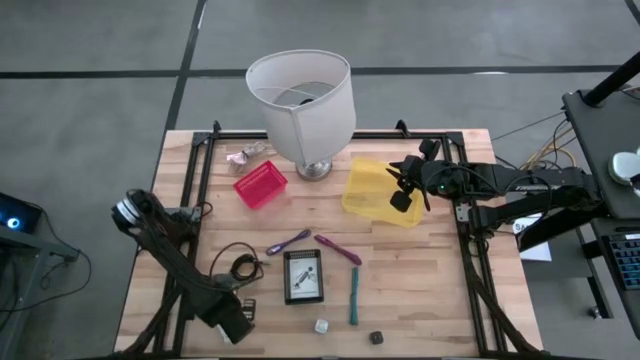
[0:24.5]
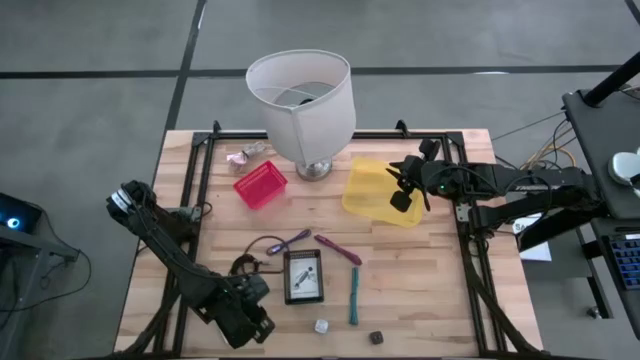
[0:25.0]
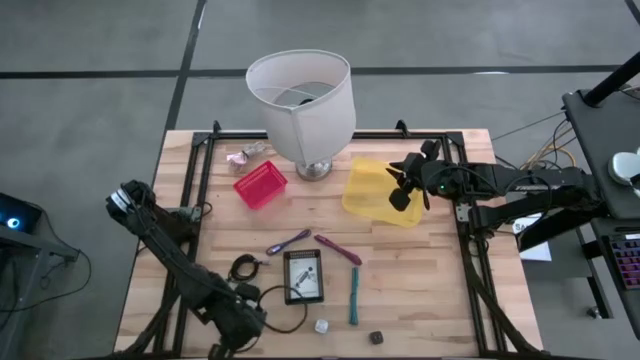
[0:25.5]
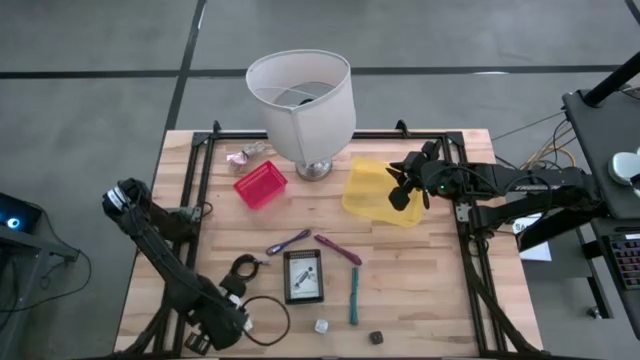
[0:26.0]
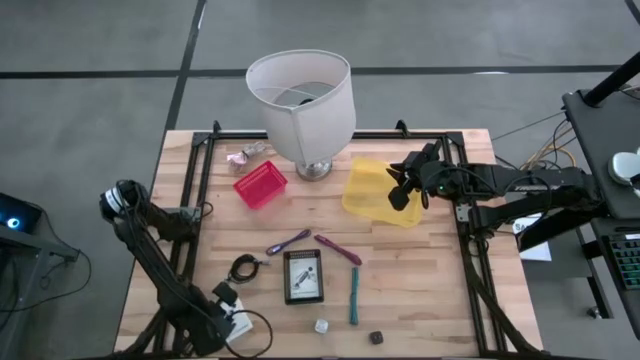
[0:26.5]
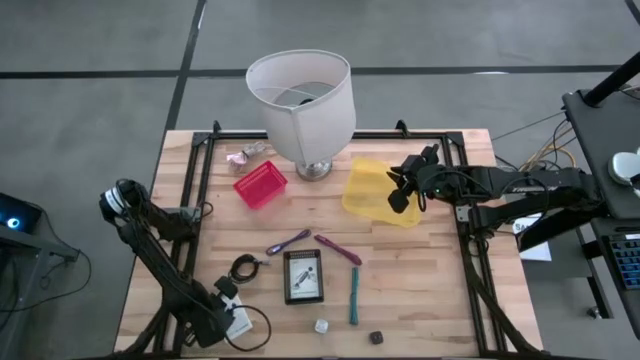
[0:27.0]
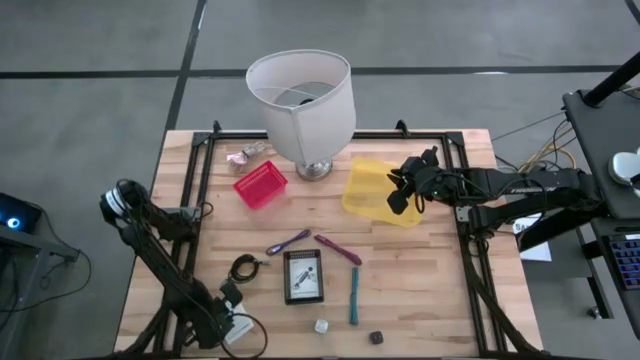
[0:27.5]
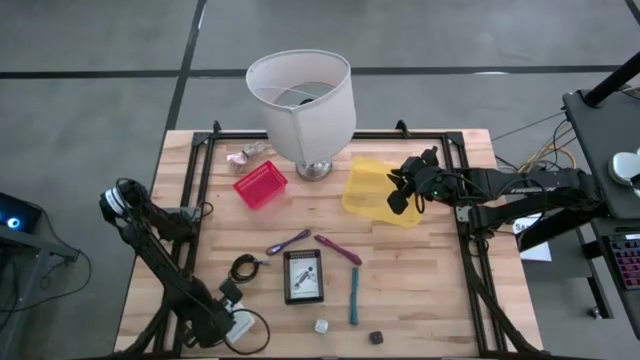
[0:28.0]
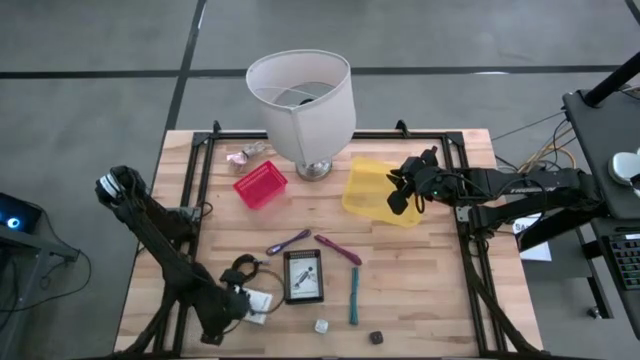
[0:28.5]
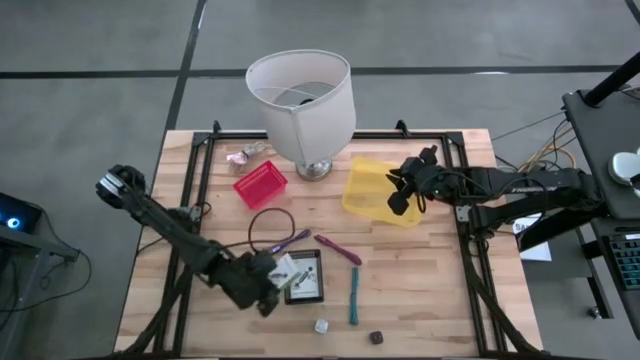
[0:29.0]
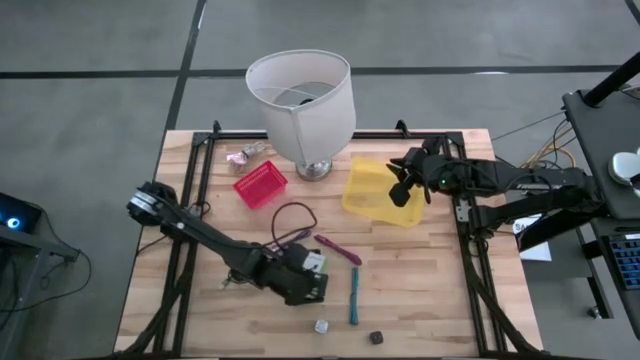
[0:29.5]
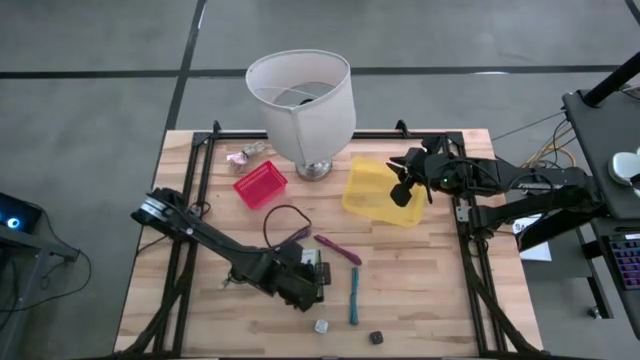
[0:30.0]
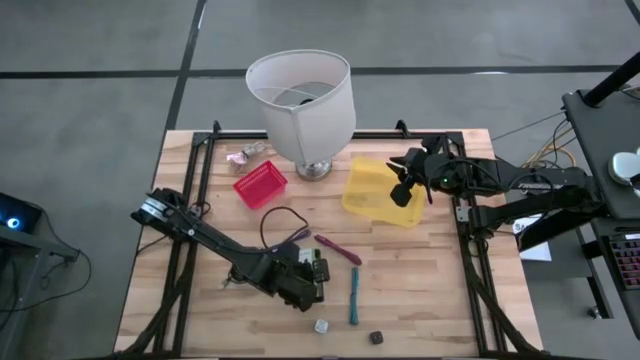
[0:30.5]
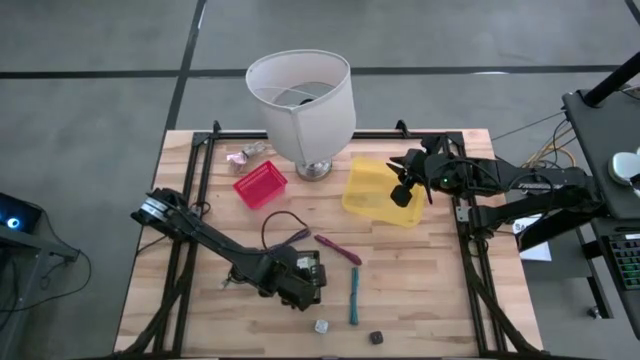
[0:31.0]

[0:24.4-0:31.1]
Task: Pick and place items into bin
Put the card reader box into the black bin

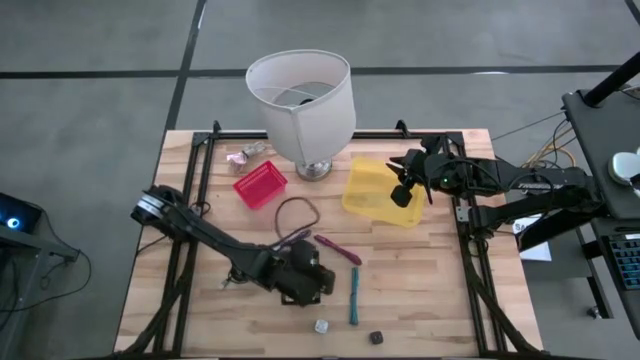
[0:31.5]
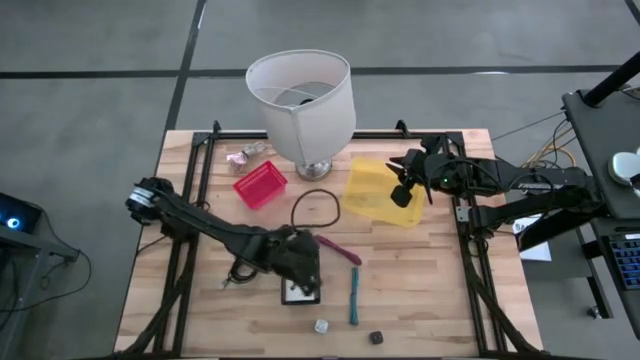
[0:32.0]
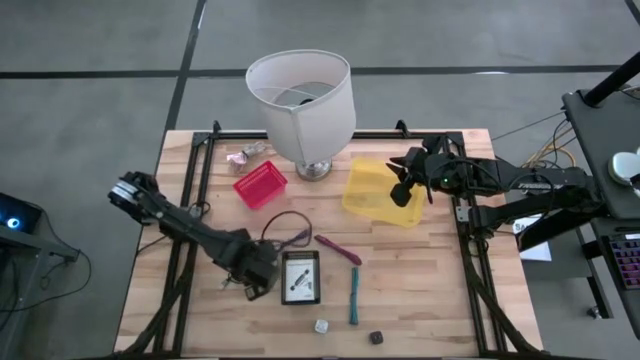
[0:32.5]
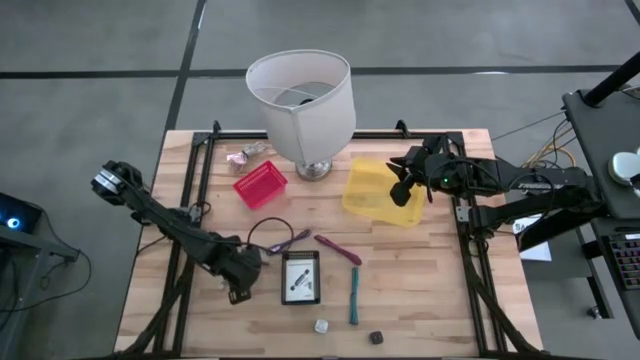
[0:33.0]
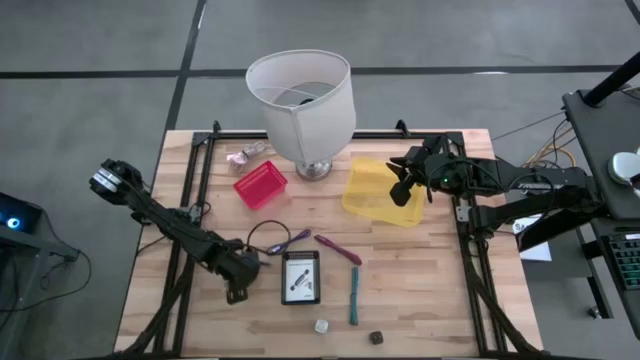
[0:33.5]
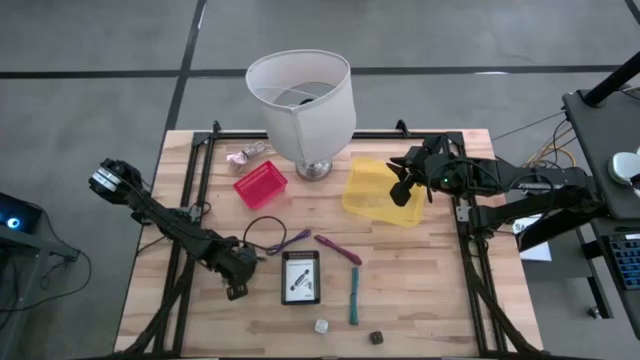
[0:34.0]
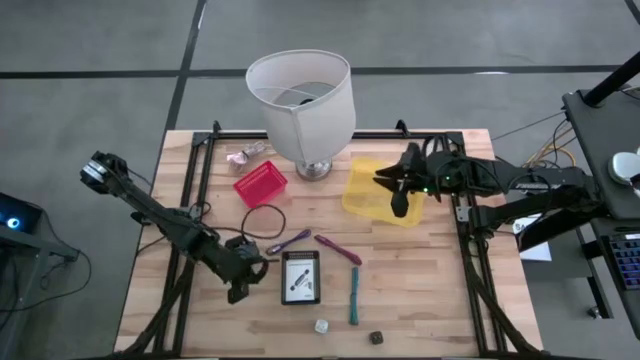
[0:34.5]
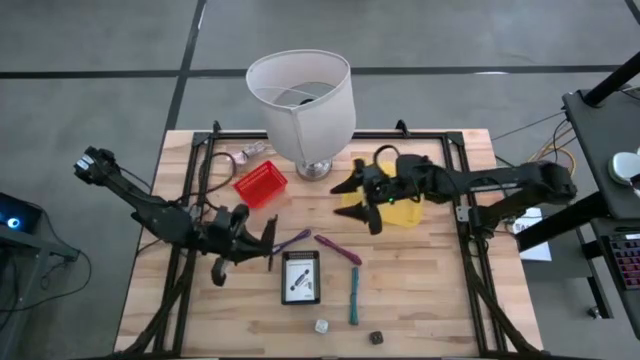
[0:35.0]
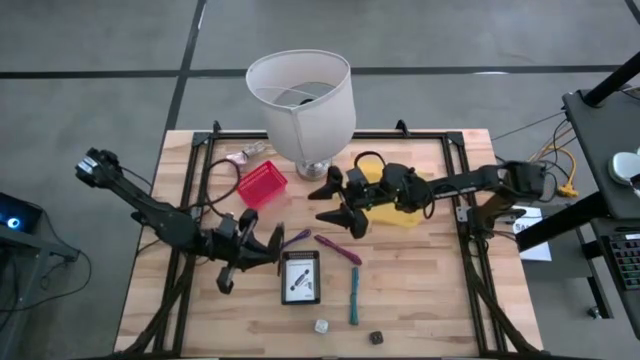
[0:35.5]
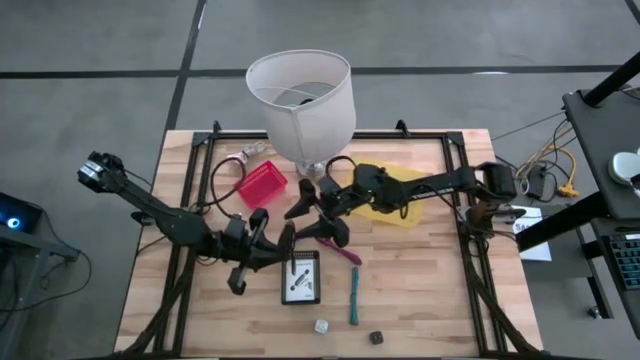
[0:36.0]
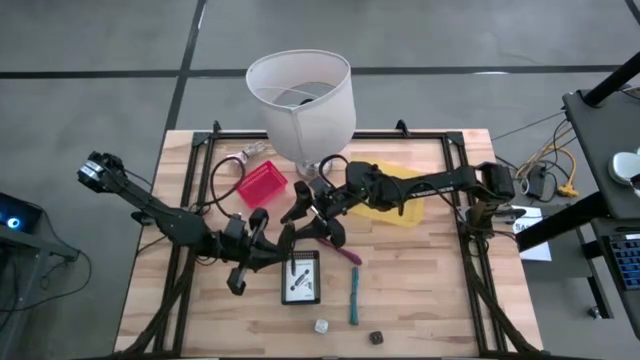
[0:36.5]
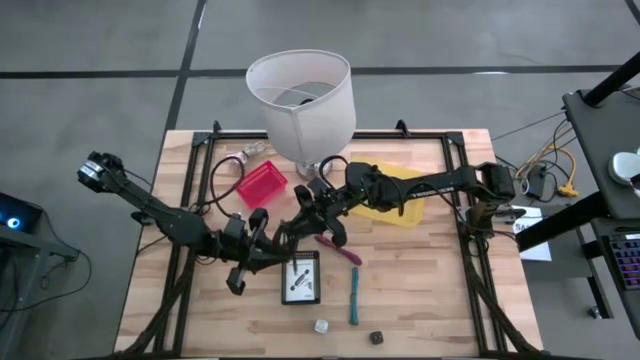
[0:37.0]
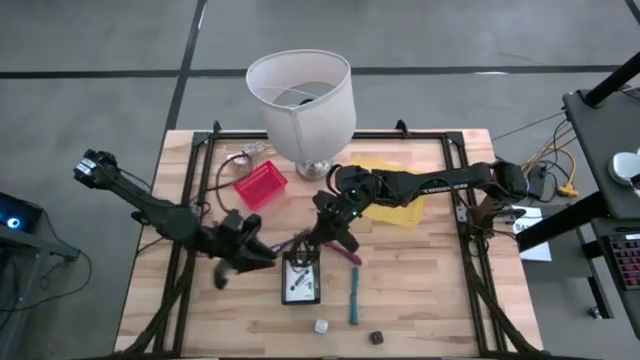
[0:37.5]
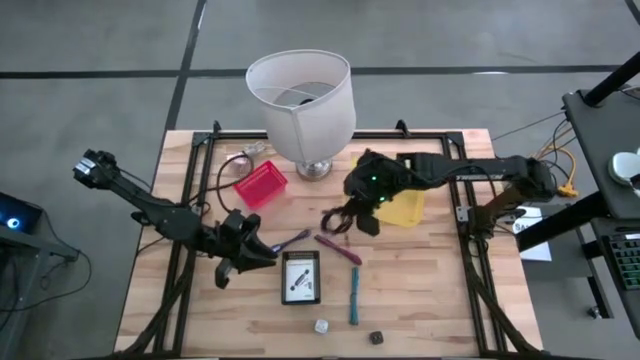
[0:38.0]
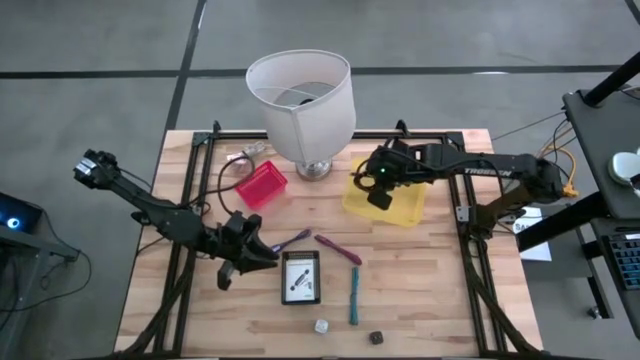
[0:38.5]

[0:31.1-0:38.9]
Put the black charger cable into the yellow bin

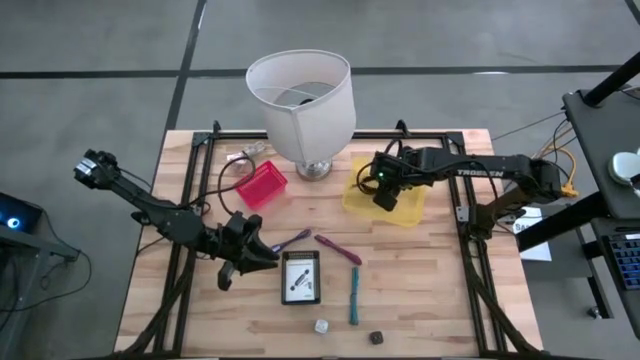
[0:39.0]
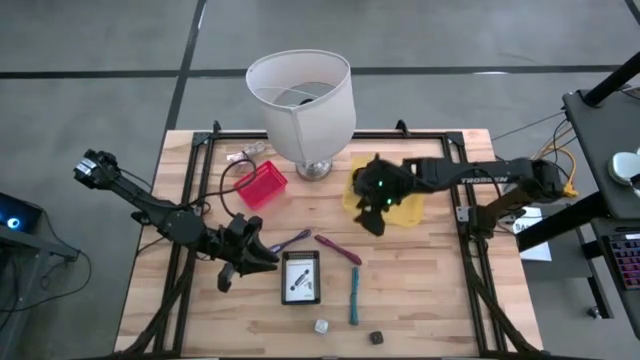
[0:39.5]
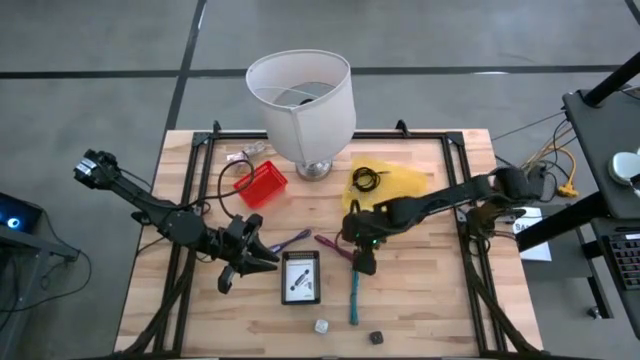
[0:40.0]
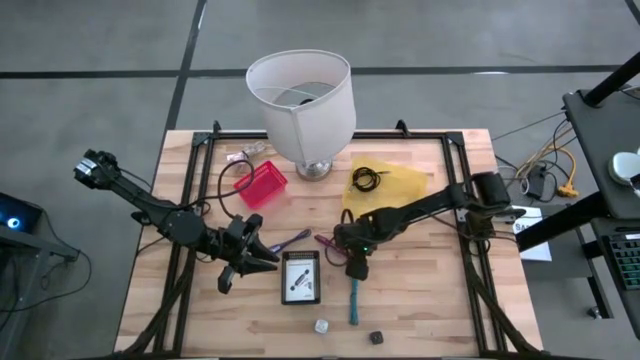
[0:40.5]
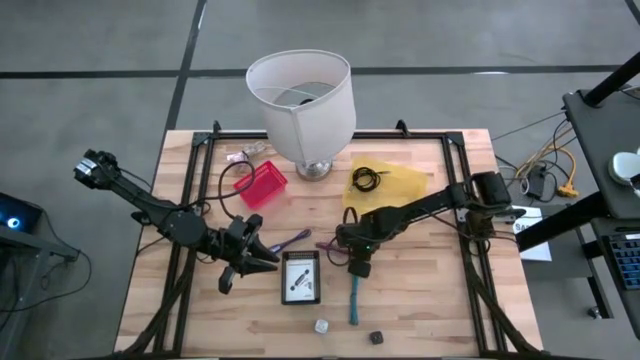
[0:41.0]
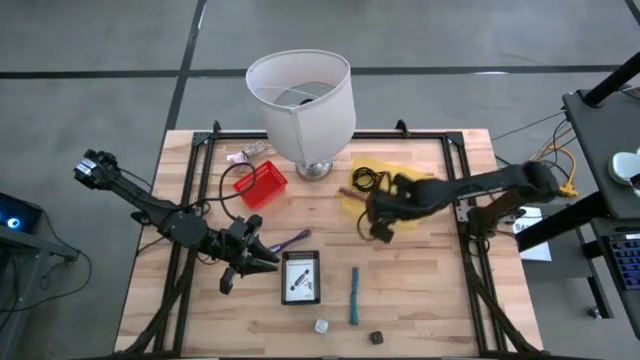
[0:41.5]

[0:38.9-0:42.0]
Put the pink charger cable into the yellow bin

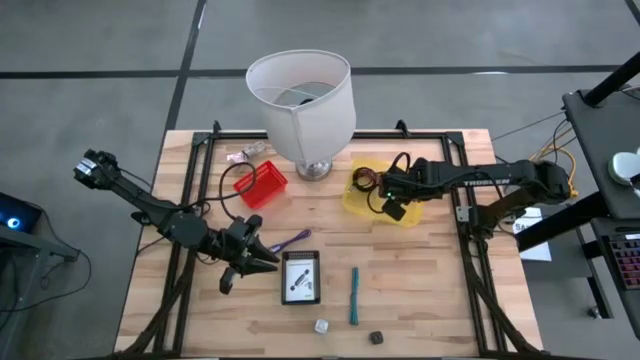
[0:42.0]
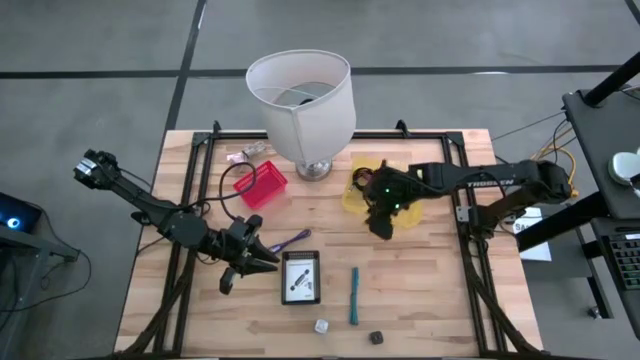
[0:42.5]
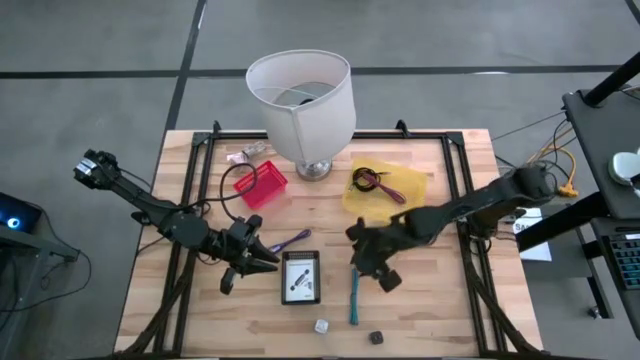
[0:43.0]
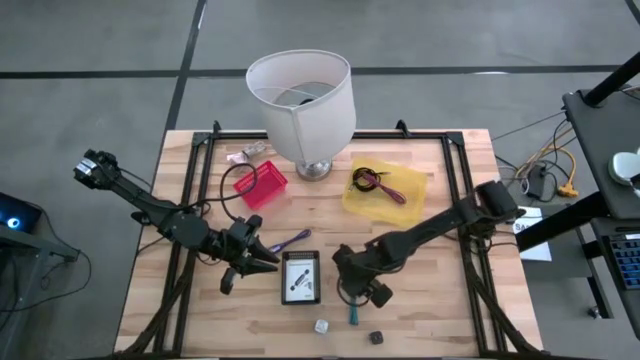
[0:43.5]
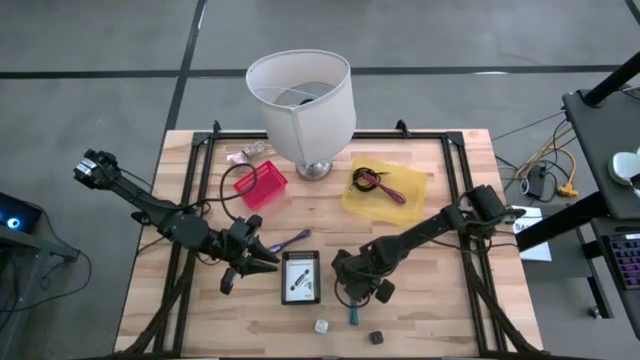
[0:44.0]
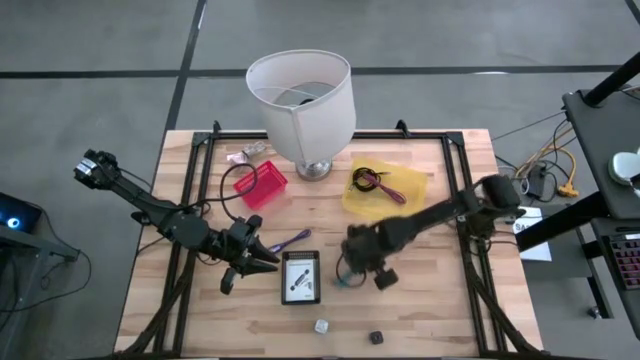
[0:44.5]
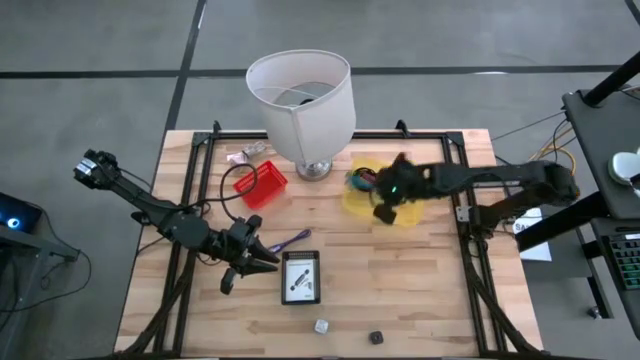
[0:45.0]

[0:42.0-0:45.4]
Put the blue charger cable into the yellow bin

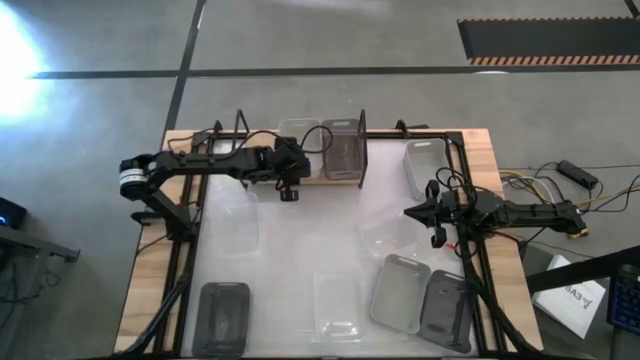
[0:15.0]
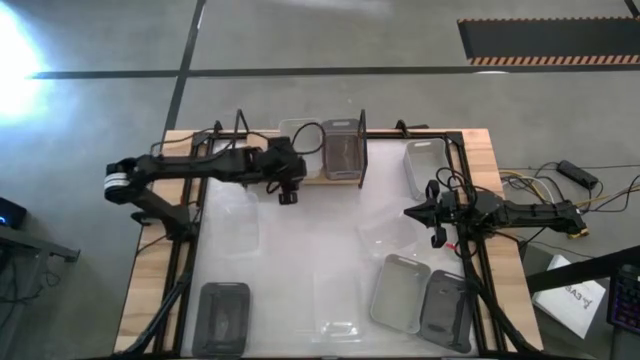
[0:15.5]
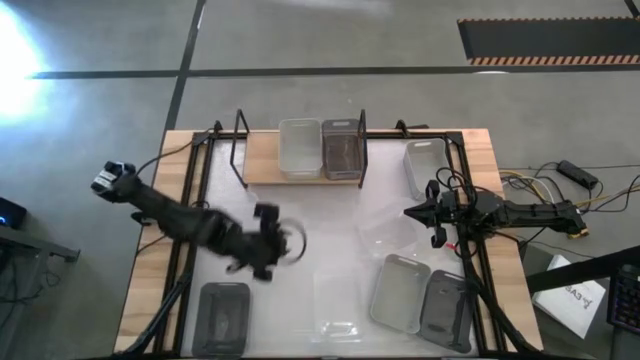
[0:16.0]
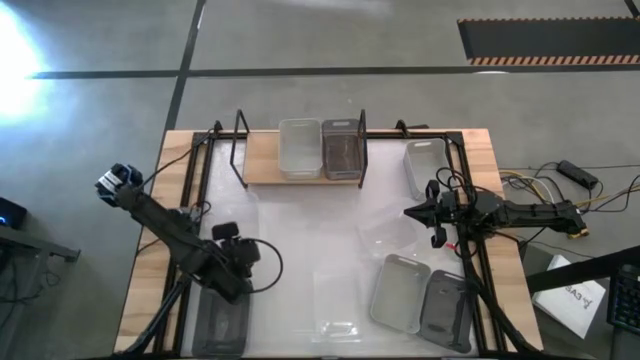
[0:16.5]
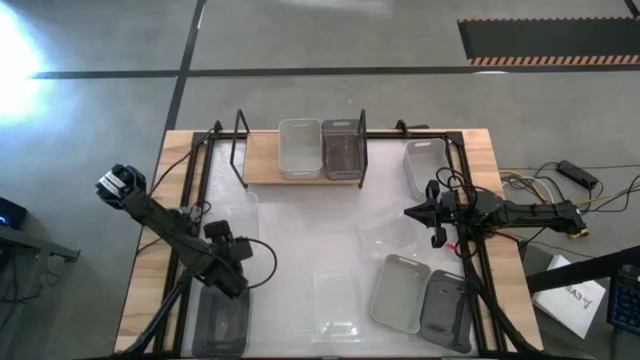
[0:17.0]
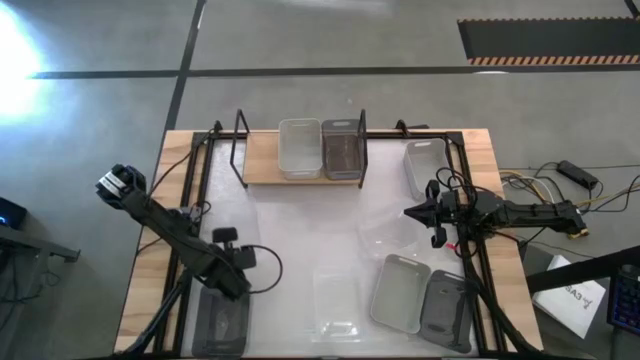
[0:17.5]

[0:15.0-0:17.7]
Task: Stack baskets on shelf by color
Put the top left transparent bin on the shelf
